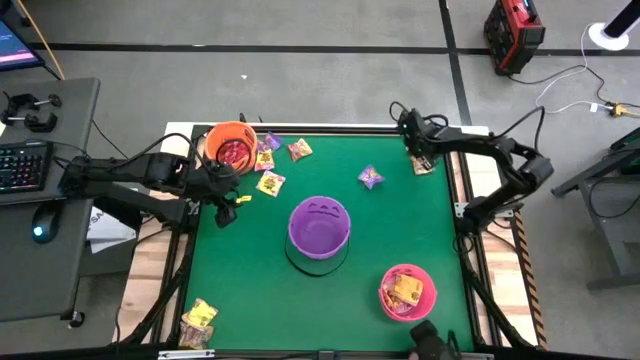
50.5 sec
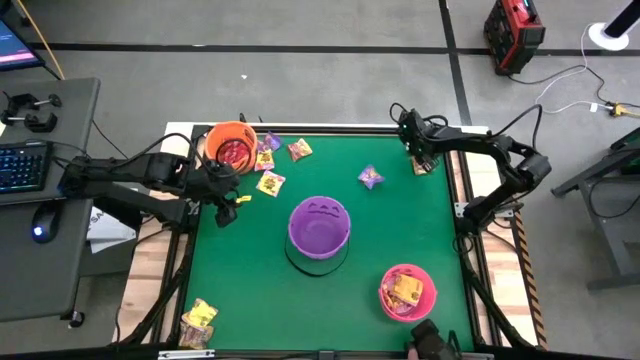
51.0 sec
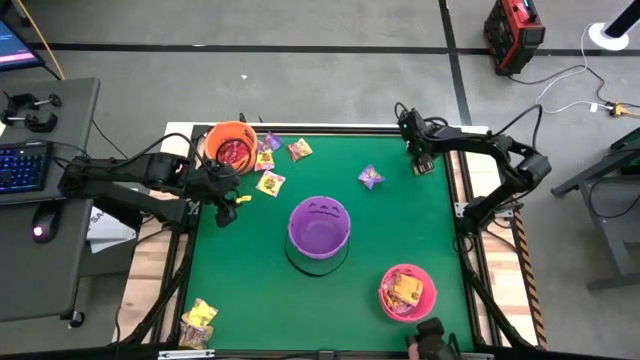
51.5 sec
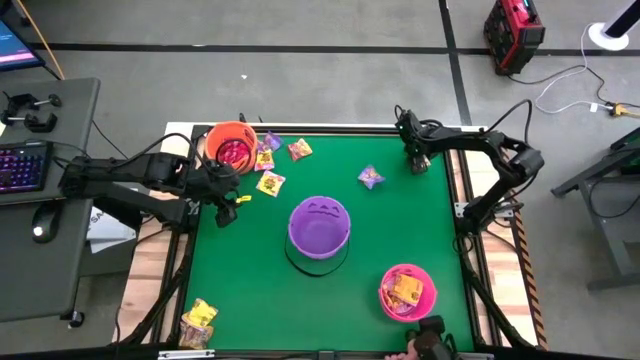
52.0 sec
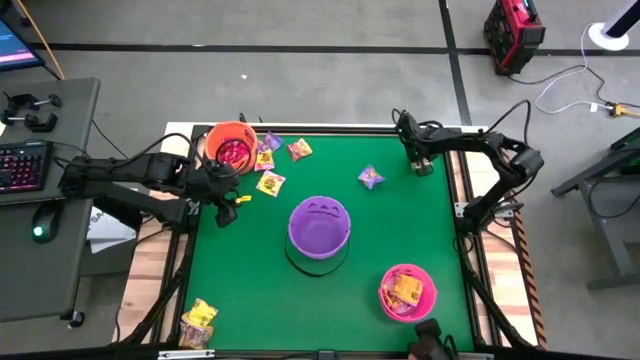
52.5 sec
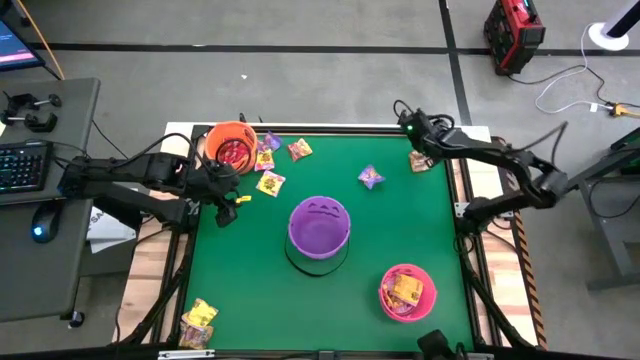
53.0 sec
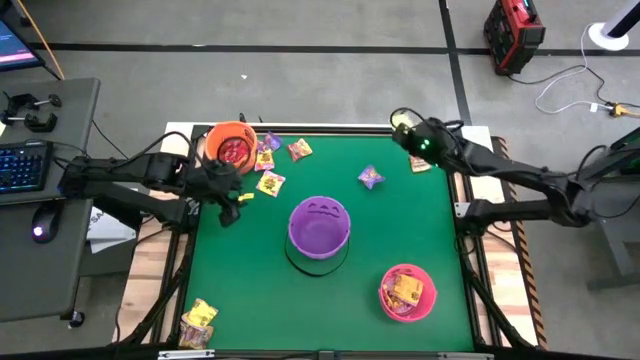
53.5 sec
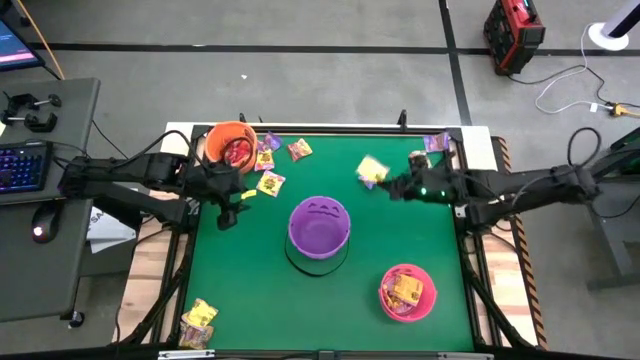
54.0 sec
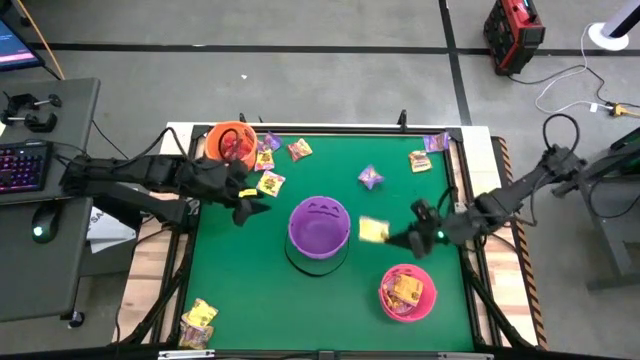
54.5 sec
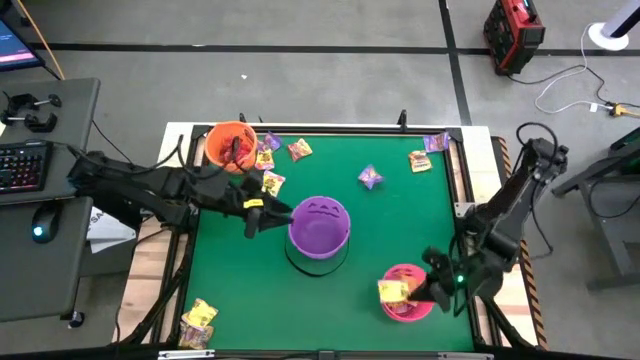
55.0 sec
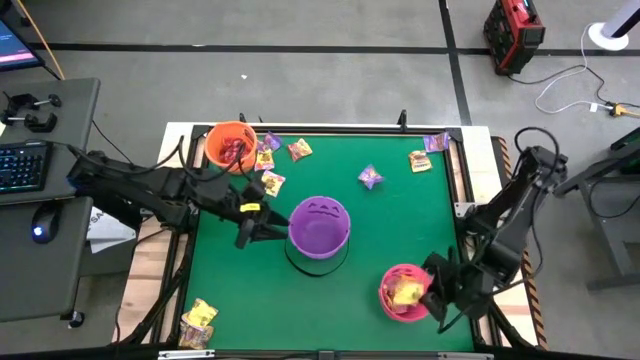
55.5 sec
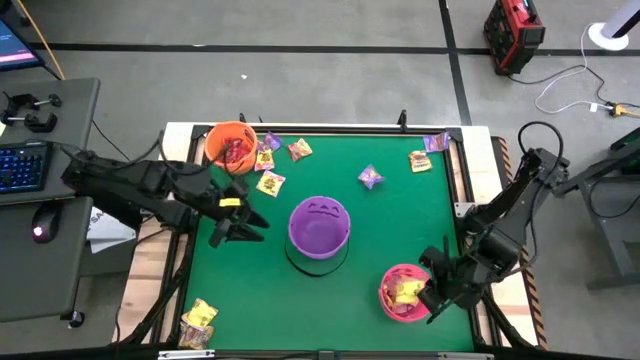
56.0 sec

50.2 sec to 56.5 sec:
Task: Sort candy by brand, put in halloween buckets
Put the yellow candy into the pink bucket

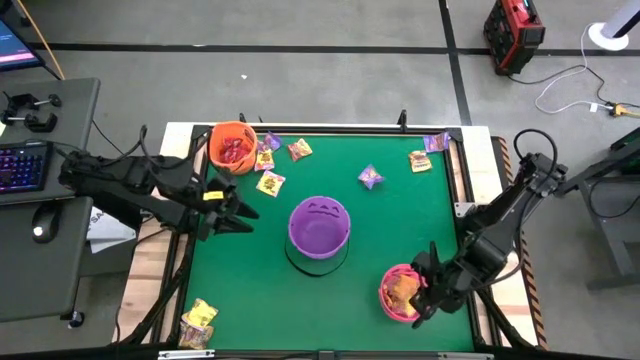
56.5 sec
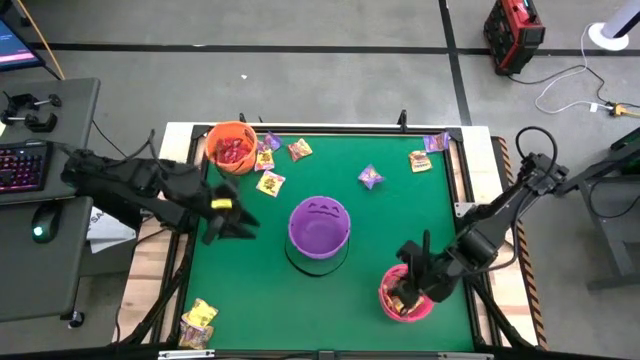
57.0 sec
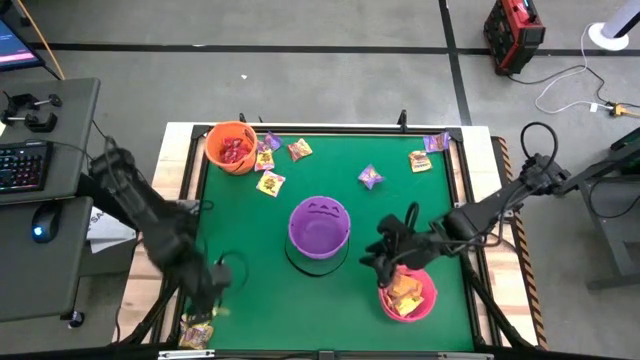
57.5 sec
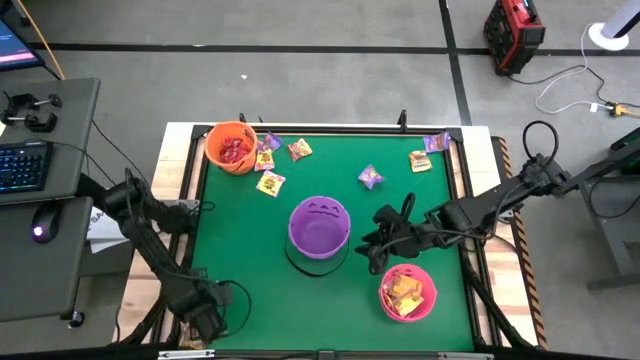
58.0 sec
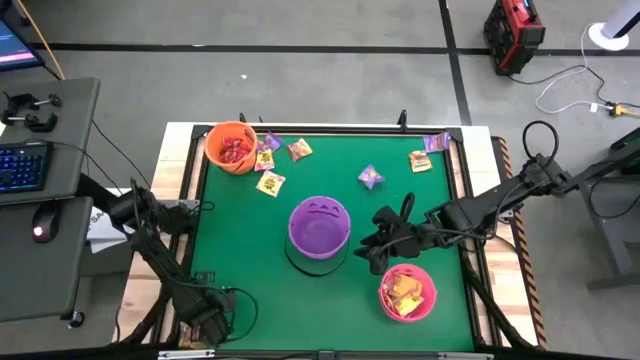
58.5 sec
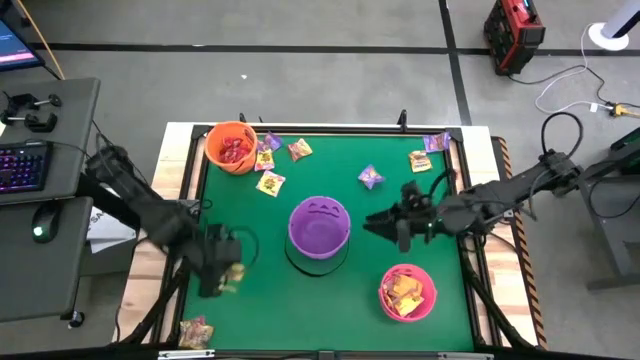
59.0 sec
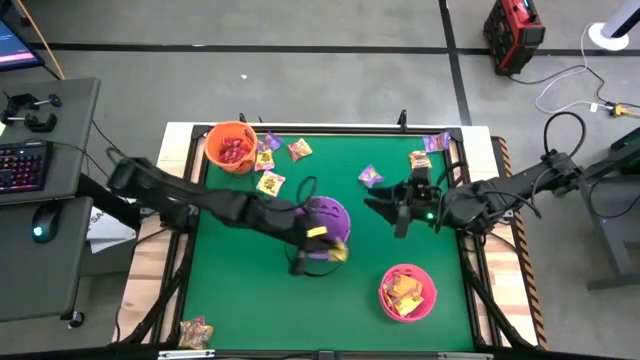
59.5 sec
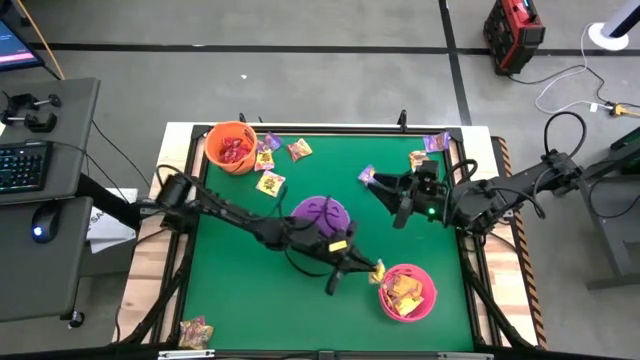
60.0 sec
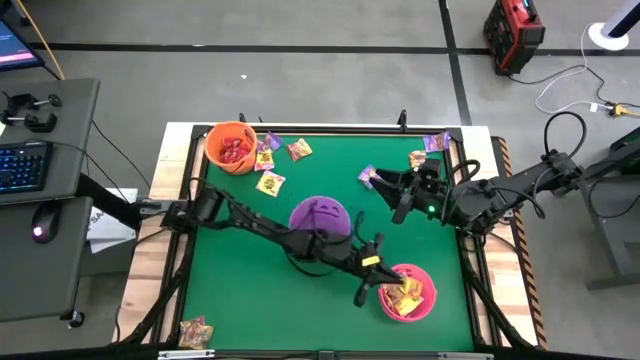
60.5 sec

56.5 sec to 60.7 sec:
Put the yellow candy into the pink bucket

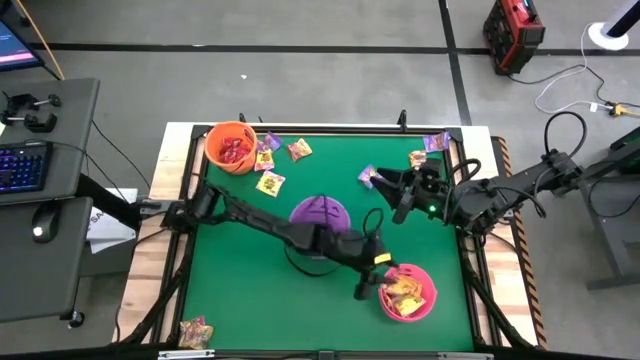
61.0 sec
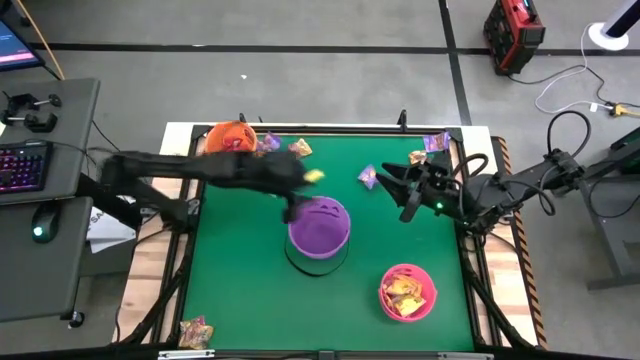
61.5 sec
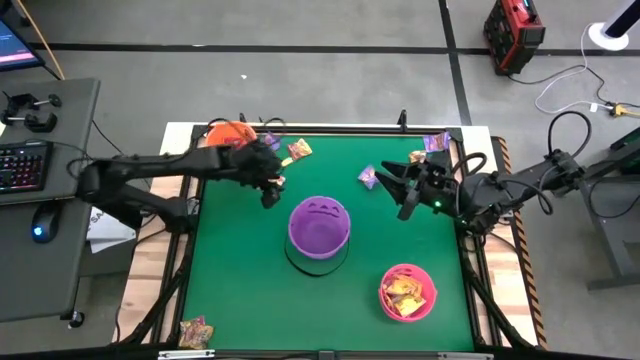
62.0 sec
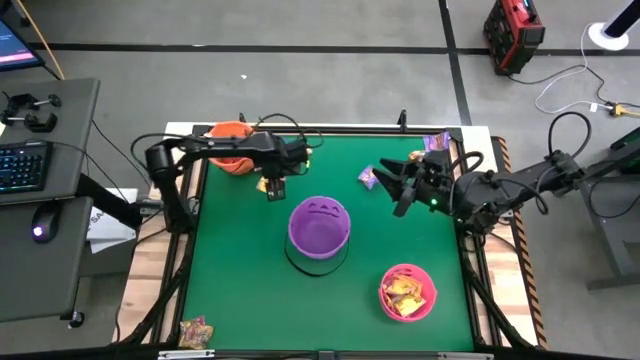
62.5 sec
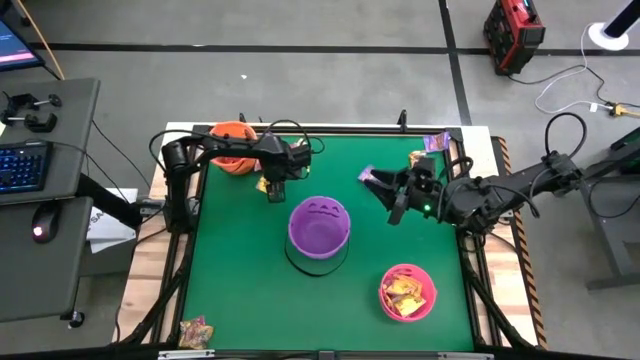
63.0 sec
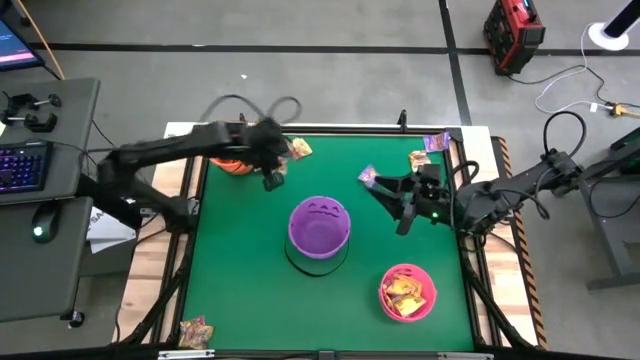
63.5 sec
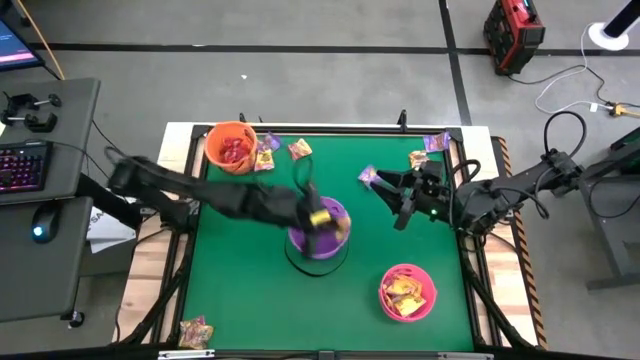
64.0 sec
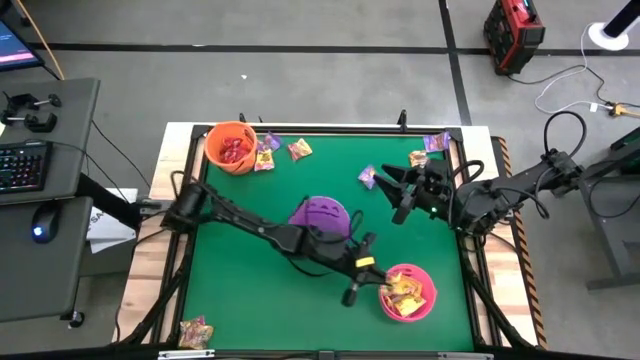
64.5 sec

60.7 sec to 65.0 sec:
Put the yellow candy into the pink bucket

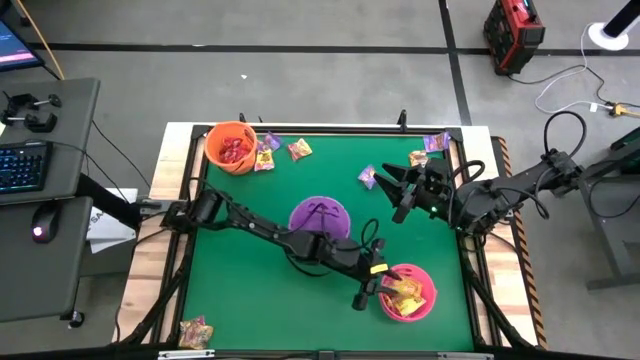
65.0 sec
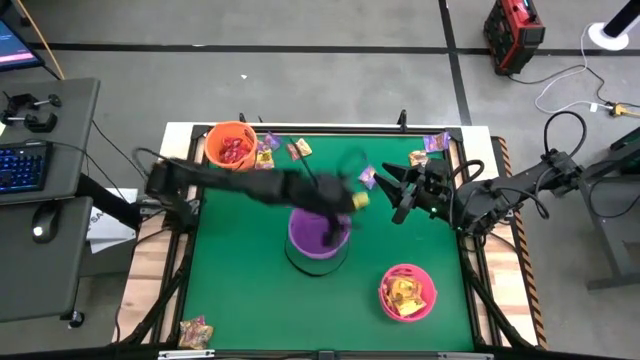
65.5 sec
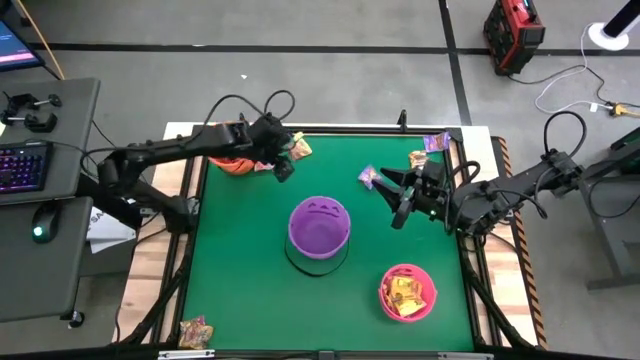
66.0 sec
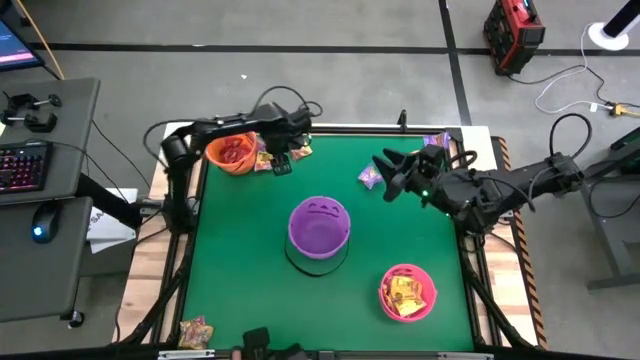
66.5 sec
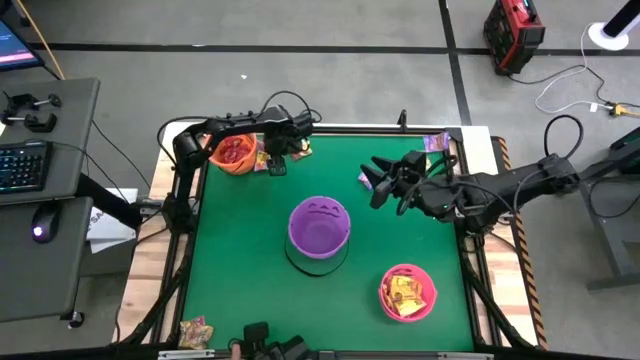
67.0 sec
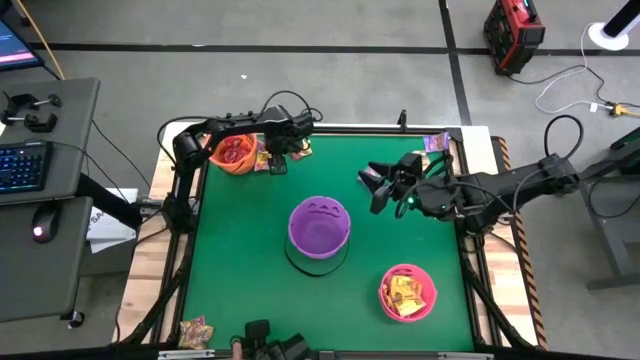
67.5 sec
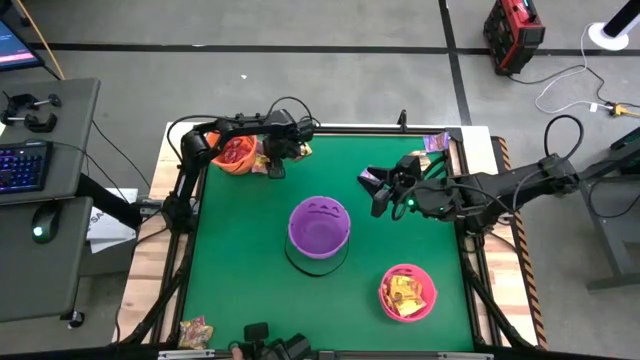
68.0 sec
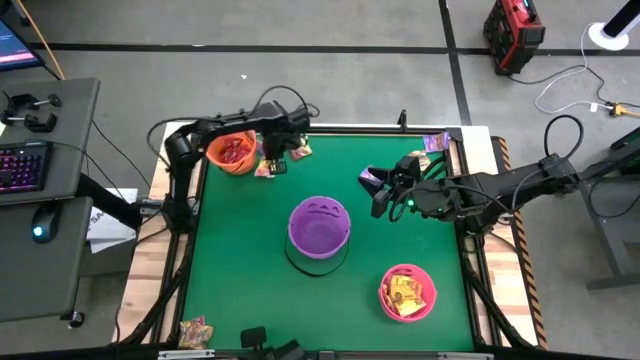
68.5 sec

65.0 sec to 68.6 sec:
Put the yellow candy into the pink bucket

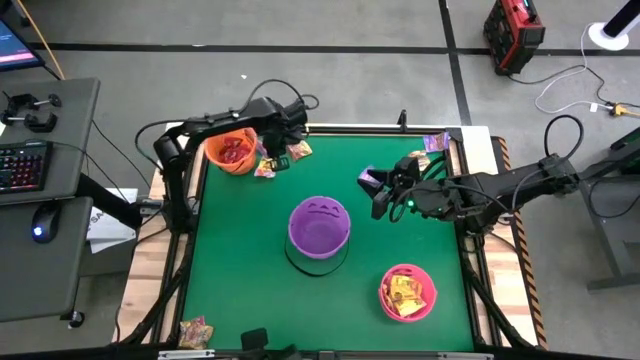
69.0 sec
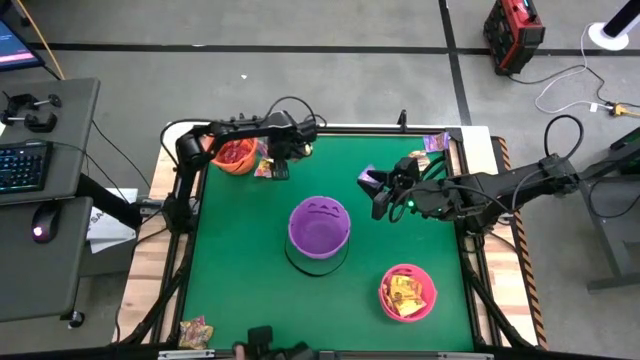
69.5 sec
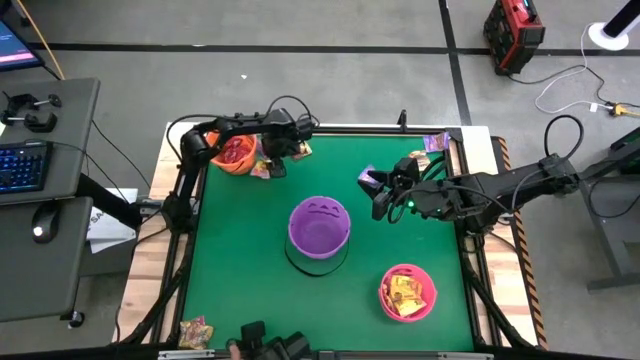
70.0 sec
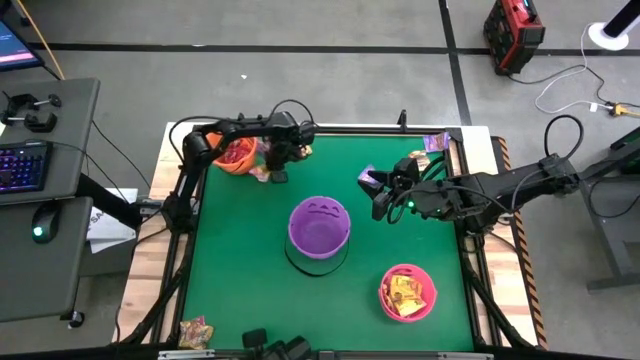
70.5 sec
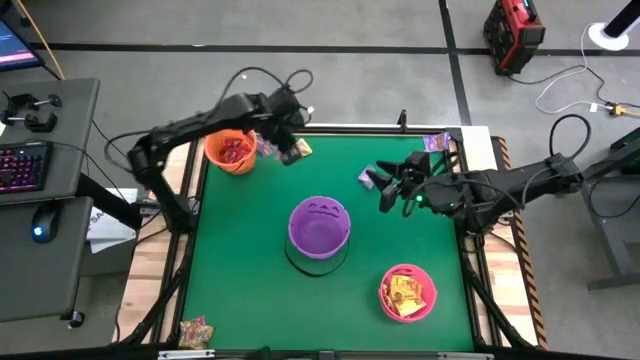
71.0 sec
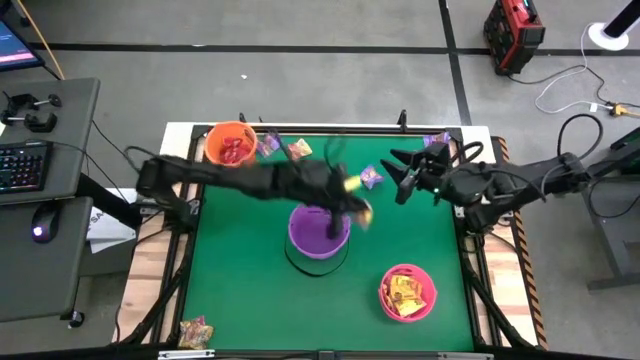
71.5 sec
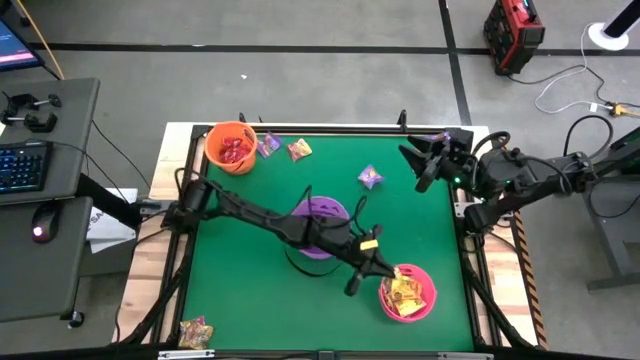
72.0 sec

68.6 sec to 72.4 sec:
Put the yellow candy into the pink bucket
